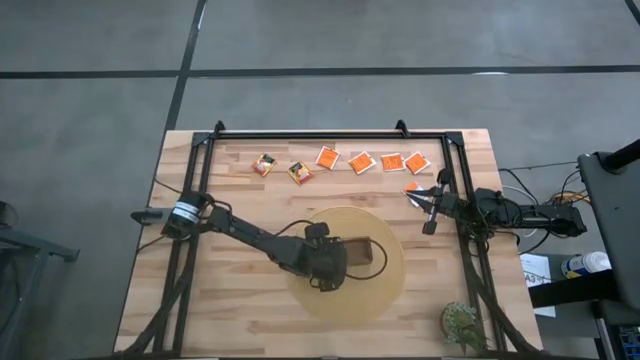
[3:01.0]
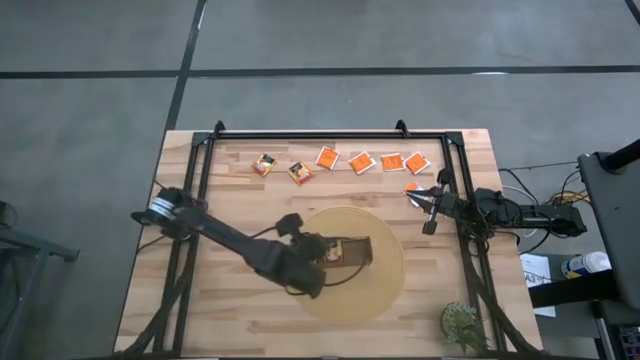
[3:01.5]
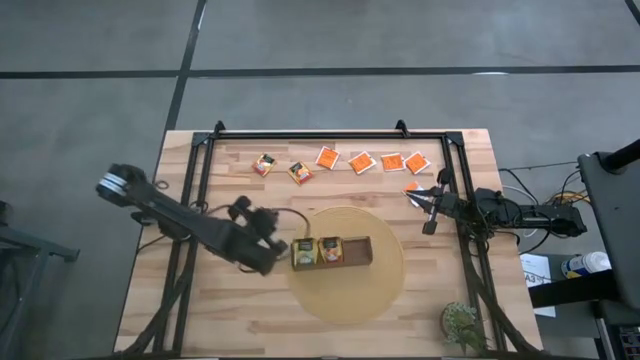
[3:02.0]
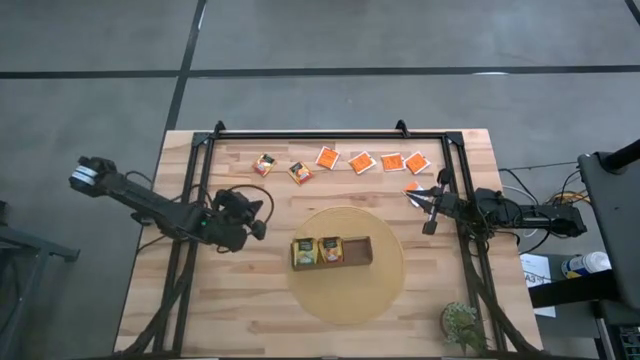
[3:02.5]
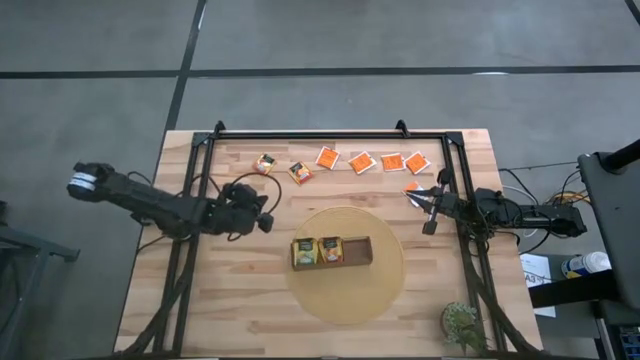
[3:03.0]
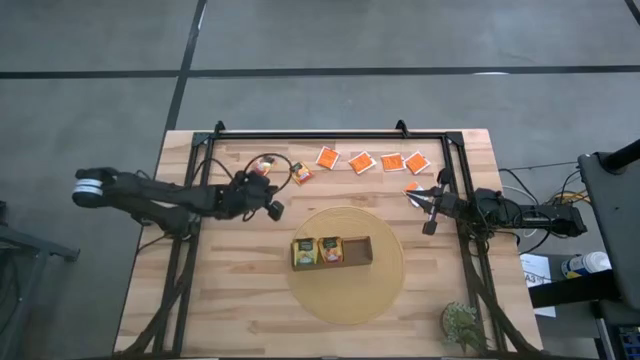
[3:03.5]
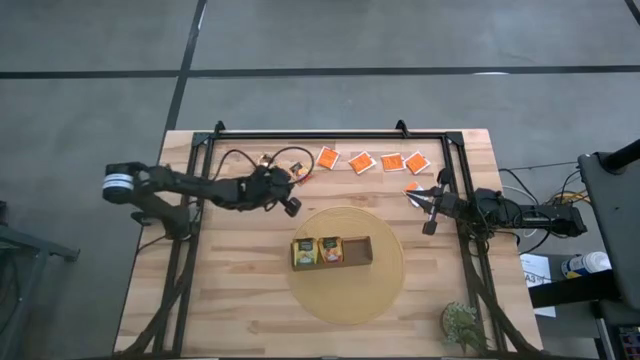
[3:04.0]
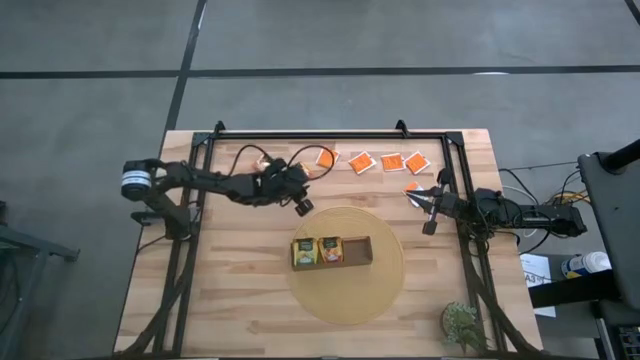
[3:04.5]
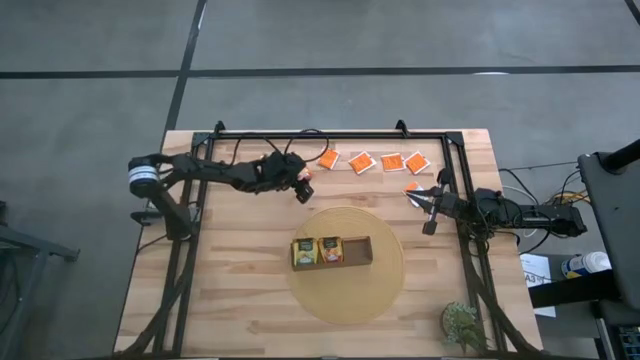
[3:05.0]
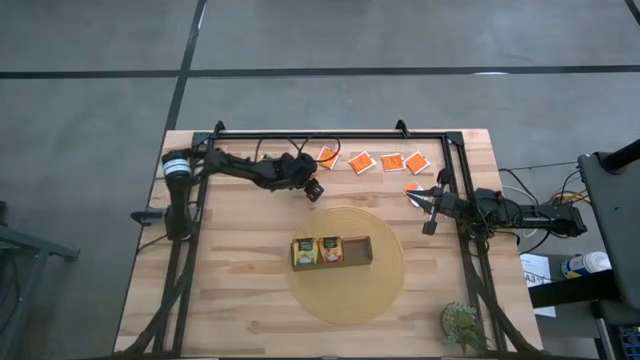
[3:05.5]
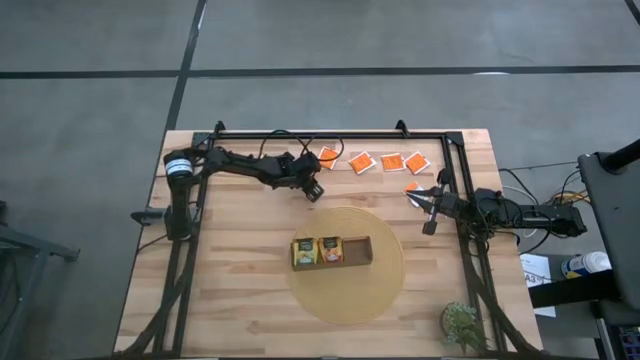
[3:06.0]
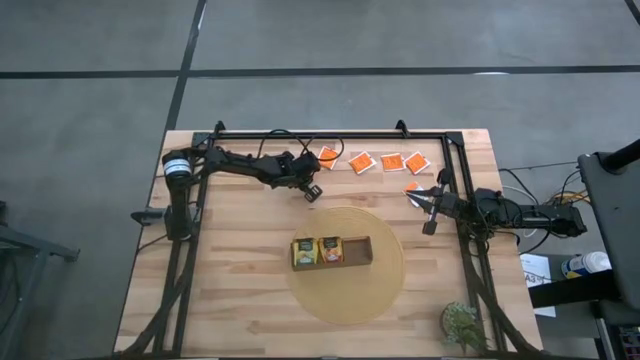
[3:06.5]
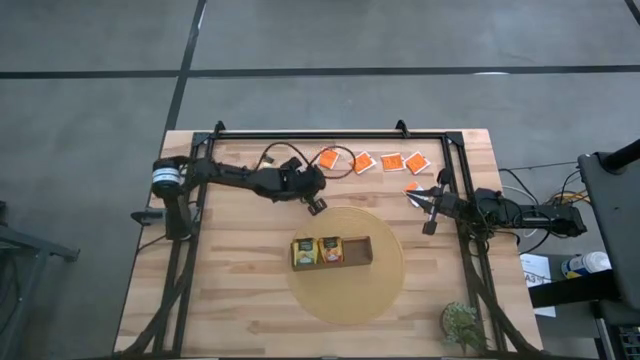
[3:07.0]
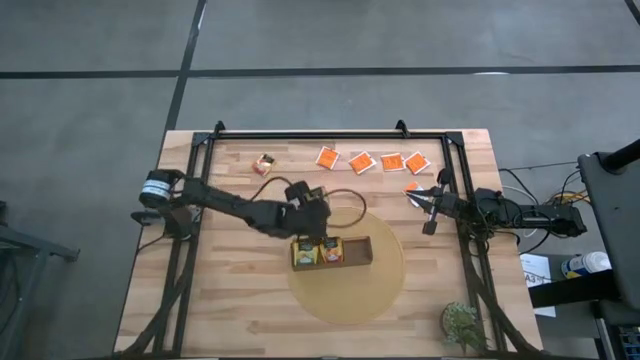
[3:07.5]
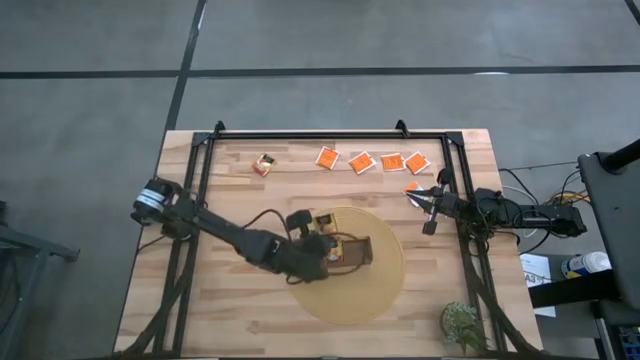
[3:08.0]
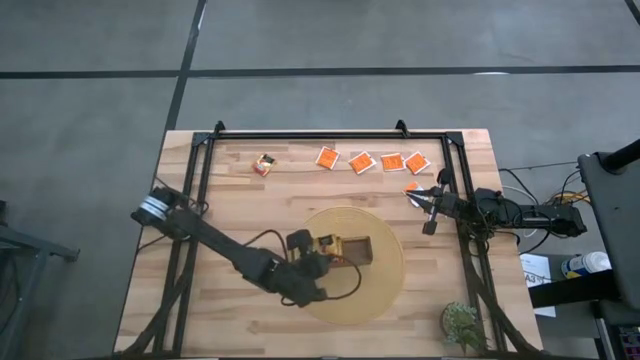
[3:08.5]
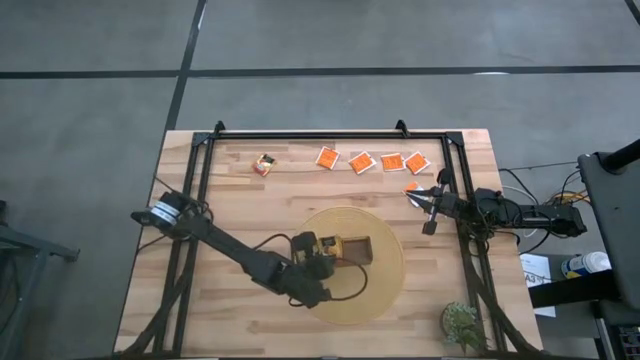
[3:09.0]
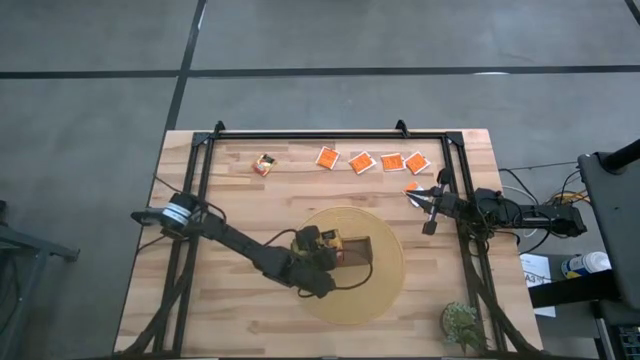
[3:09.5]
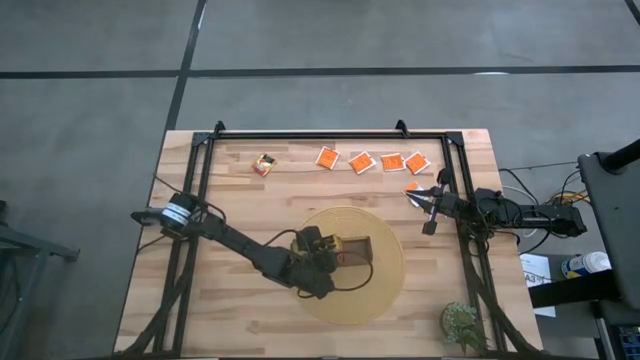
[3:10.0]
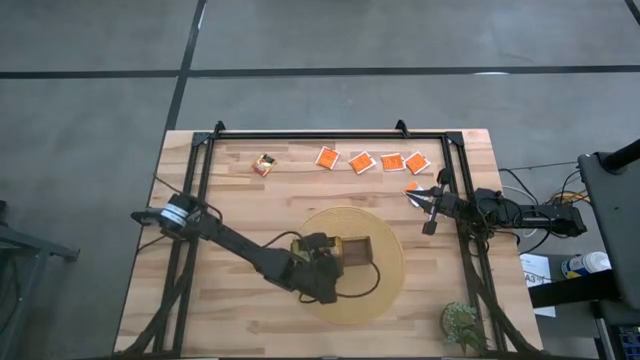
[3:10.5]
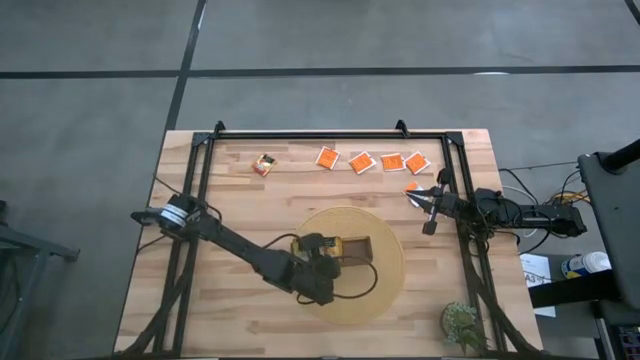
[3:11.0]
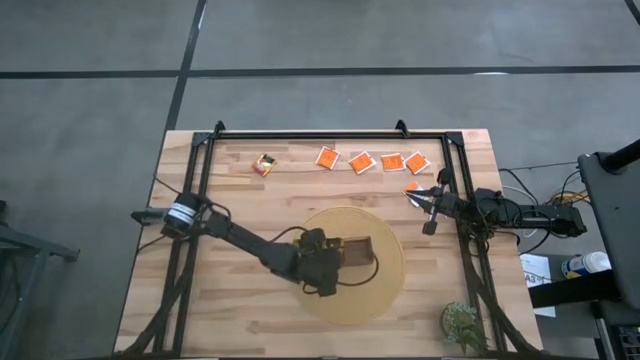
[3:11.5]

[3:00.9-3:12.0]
Task: Pick & Place Tea
Put the yellow tea bag into the middle section of the wooden organizer

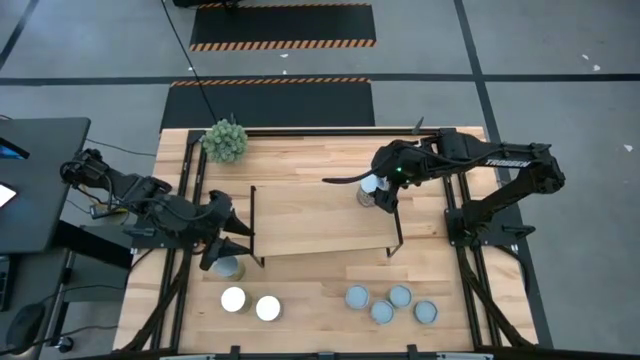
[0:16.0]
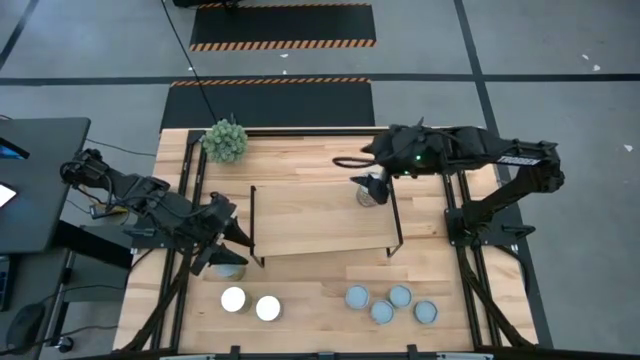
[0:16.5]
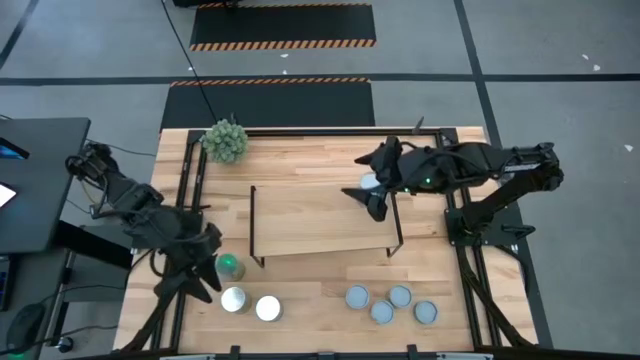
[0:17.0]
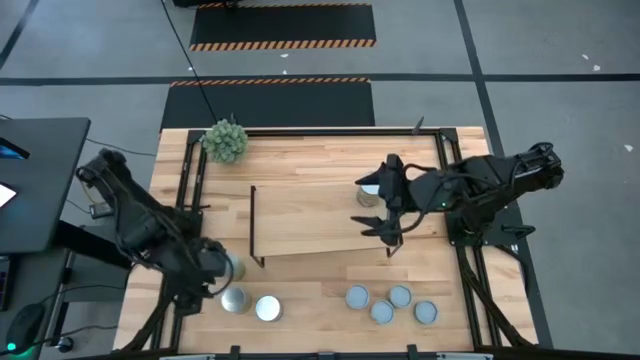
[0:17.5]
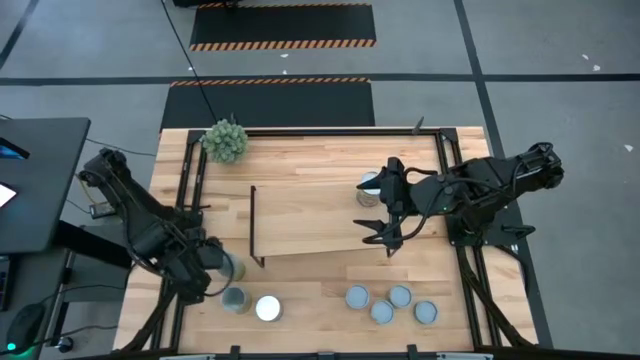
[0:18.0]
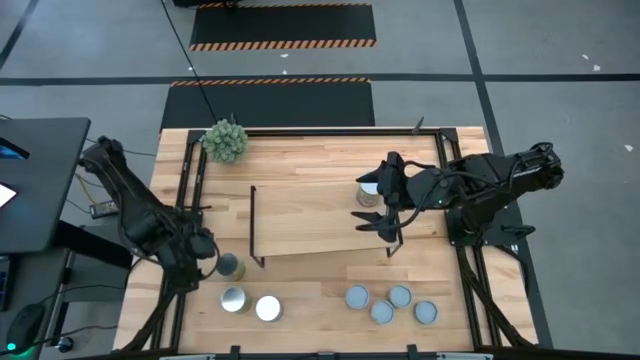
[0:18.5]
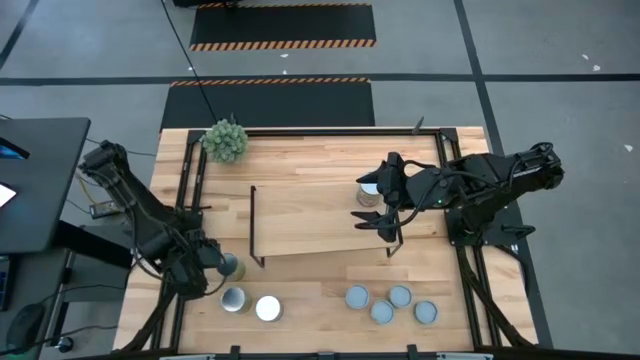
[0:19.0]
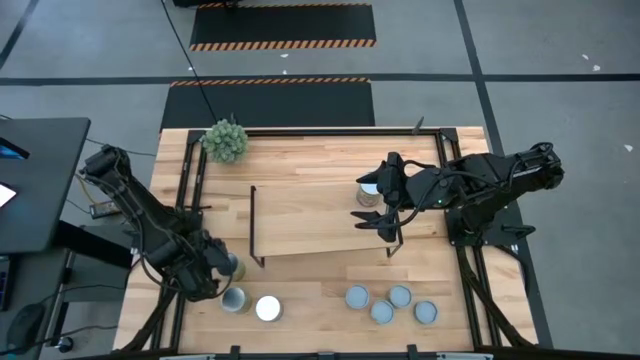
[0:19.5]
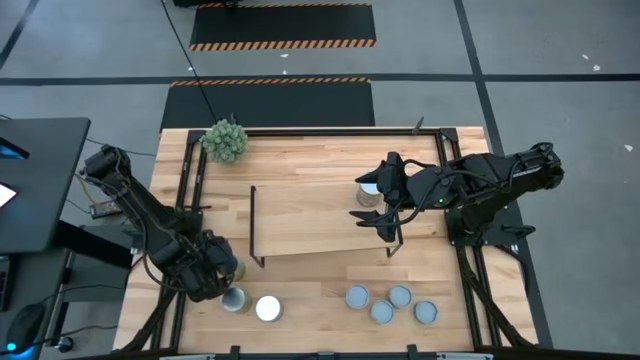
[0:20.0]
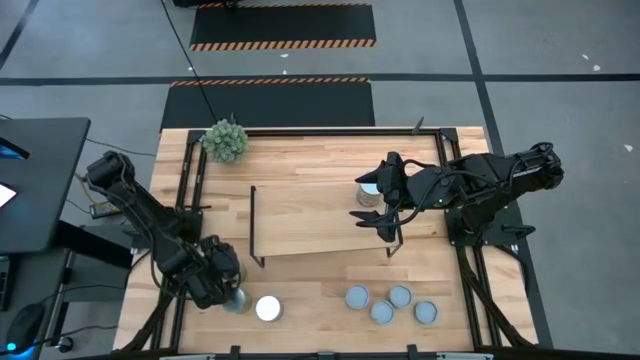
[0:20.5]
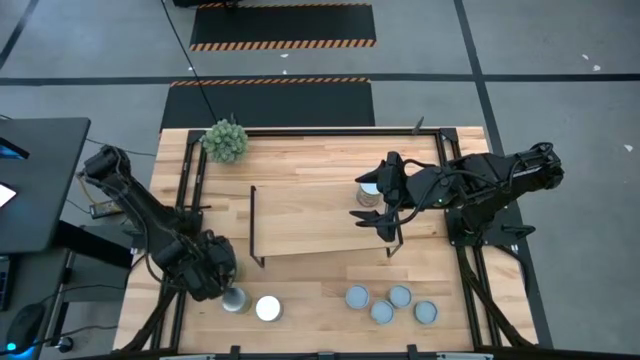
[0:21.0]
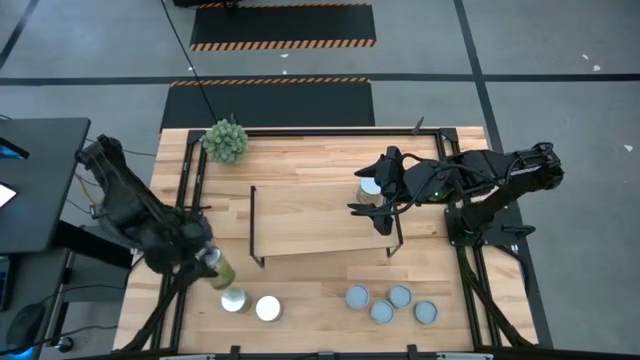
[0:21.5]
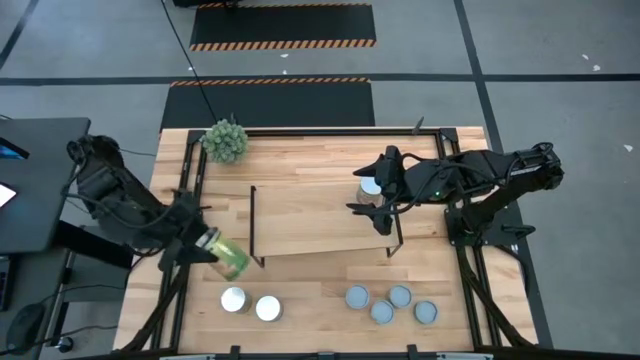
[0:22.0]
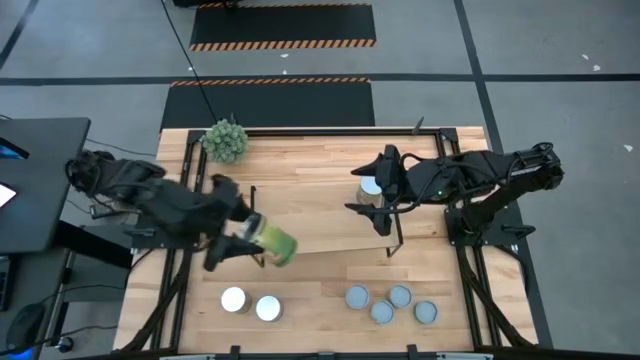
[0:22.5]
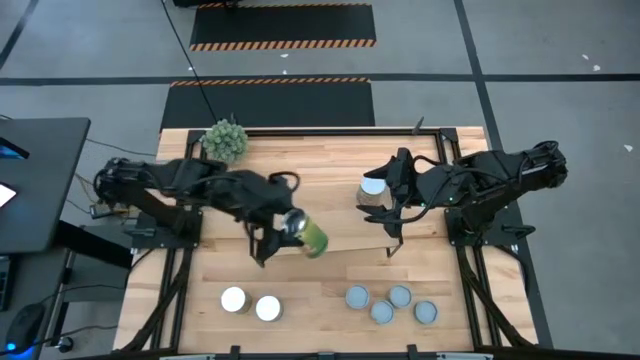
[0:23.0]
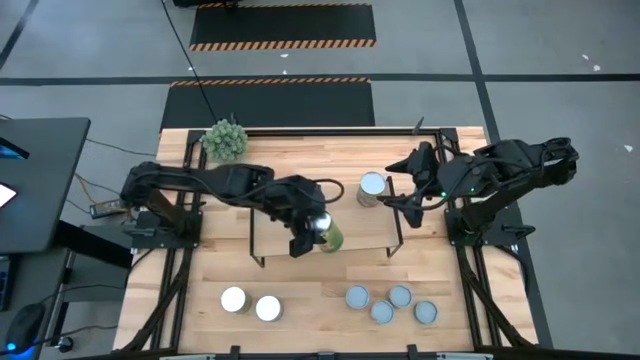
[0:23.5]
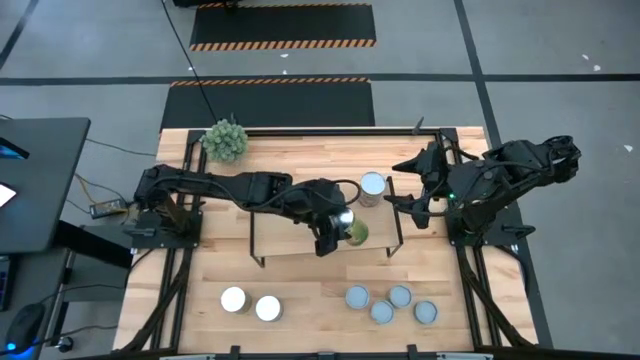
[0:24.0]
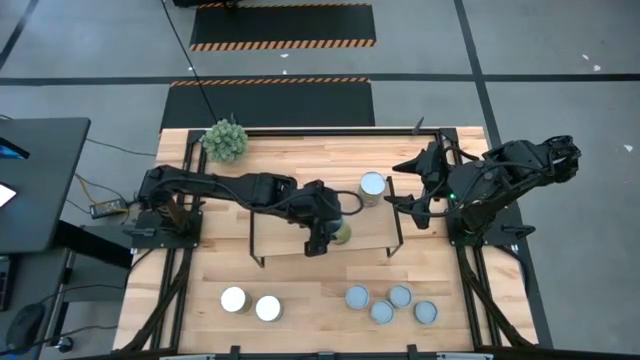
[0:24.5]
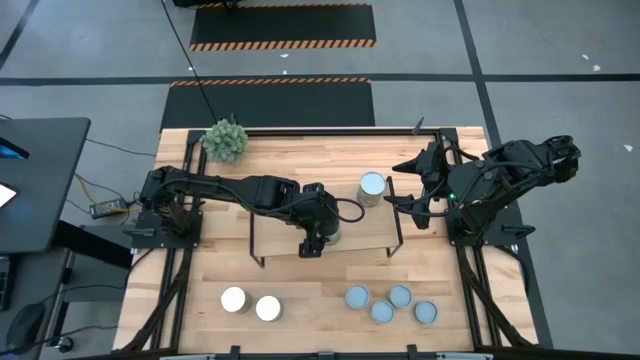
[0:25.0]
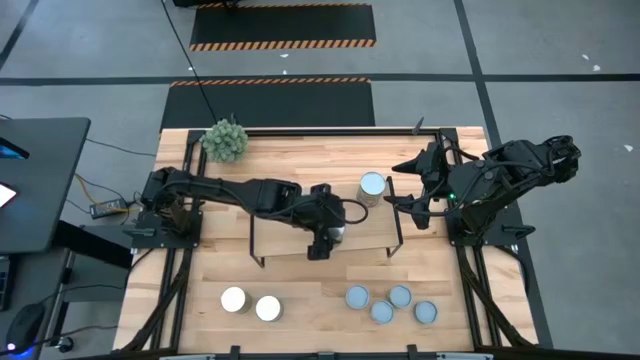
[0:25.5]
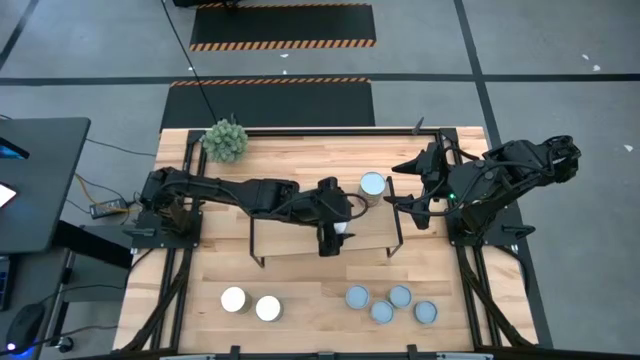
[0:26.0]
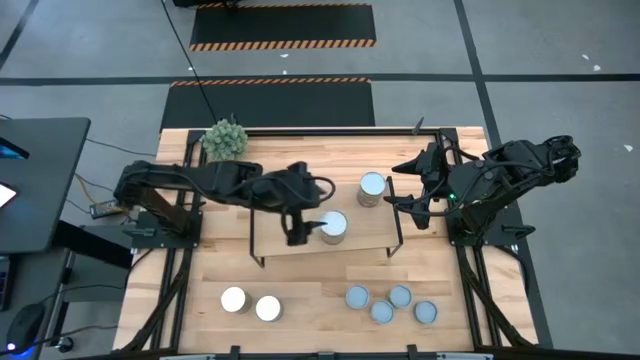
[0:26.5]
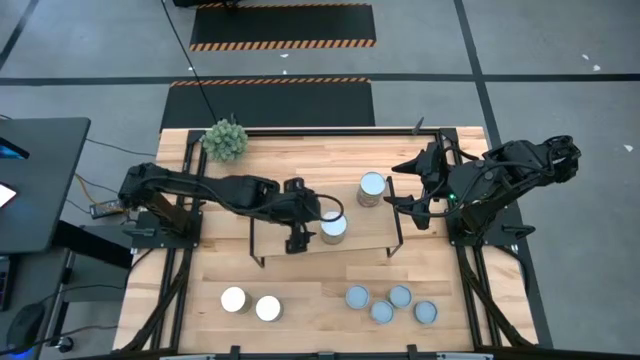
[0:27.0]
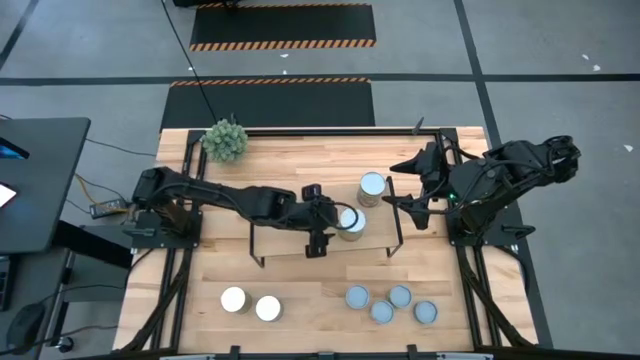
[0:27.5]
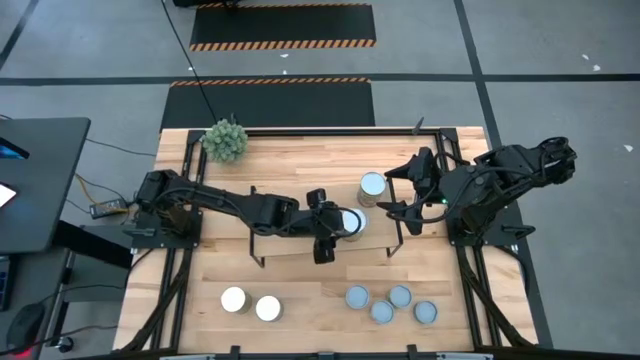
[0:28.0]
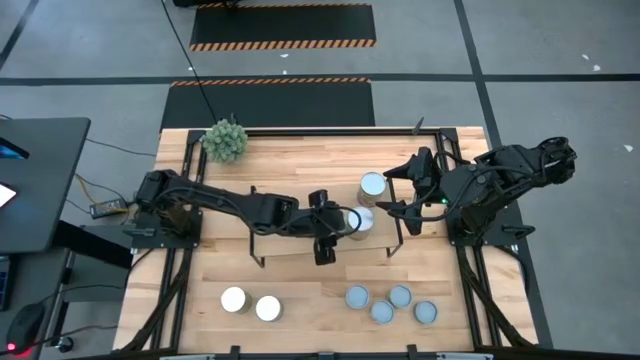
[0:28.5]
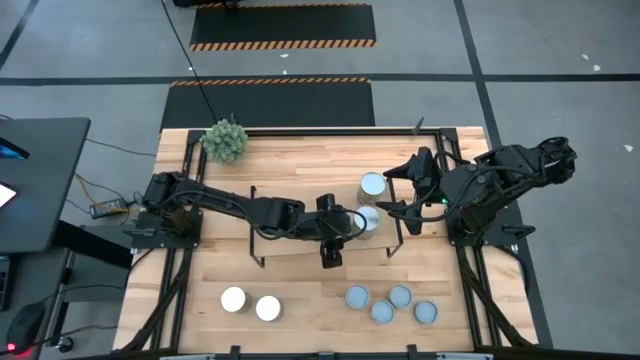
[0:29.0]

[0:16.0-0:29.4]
Task: Pick and place cans onto a shelf
Put the canned oranges on the shelf
